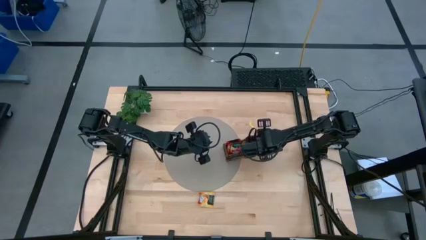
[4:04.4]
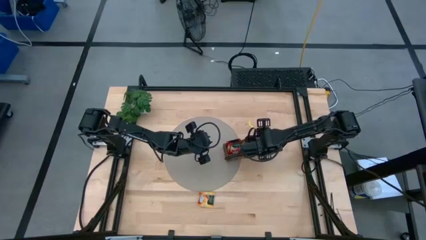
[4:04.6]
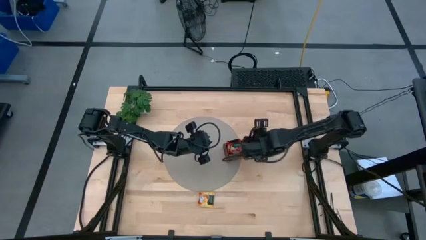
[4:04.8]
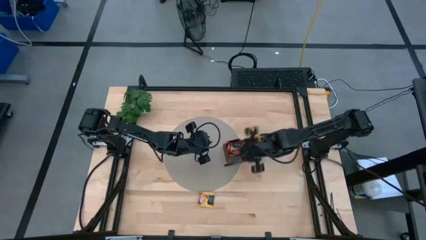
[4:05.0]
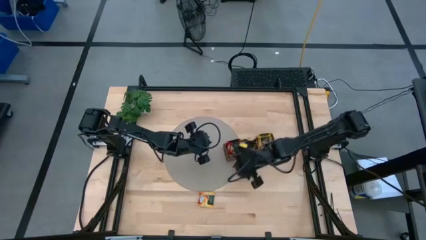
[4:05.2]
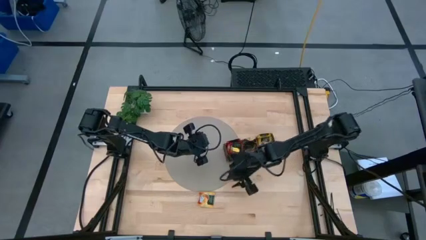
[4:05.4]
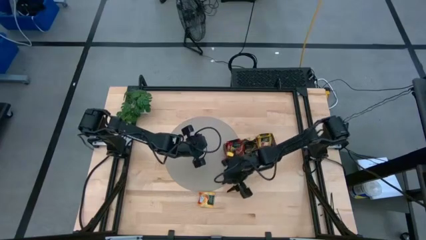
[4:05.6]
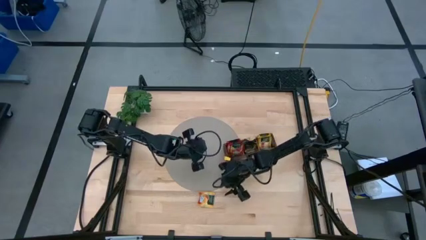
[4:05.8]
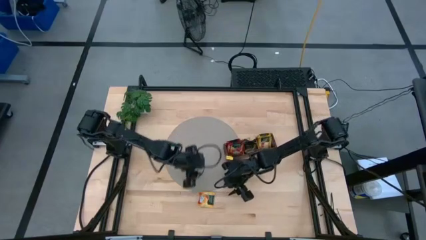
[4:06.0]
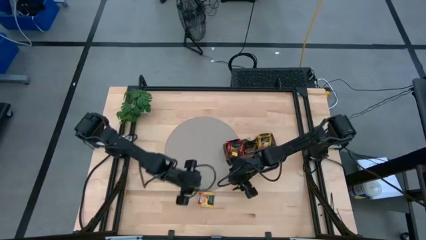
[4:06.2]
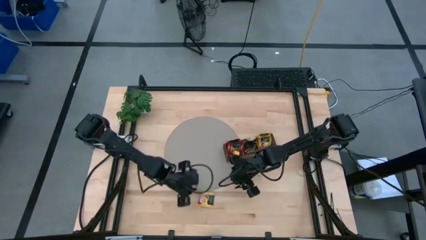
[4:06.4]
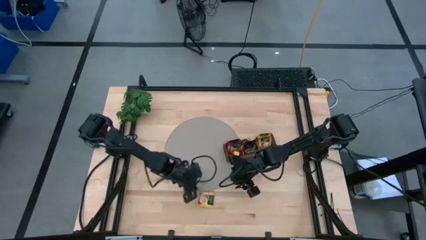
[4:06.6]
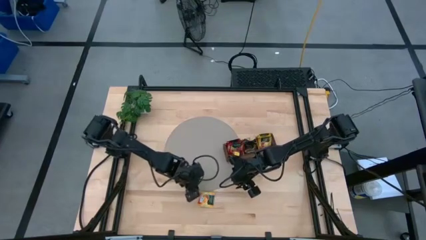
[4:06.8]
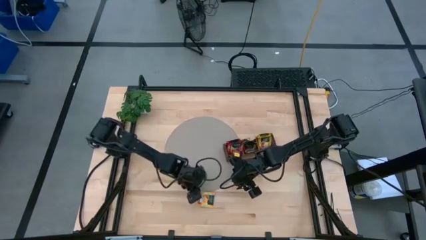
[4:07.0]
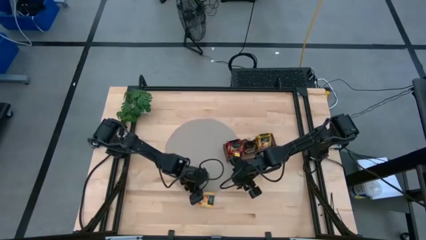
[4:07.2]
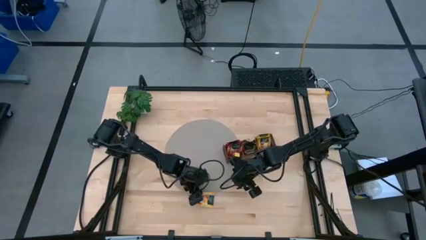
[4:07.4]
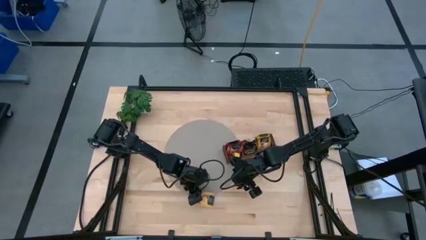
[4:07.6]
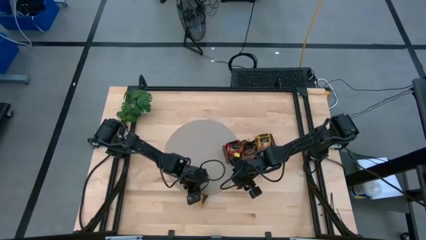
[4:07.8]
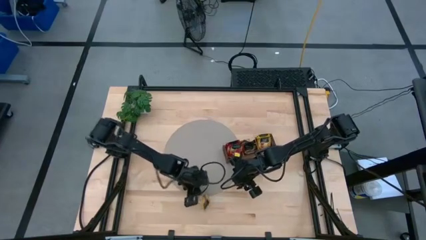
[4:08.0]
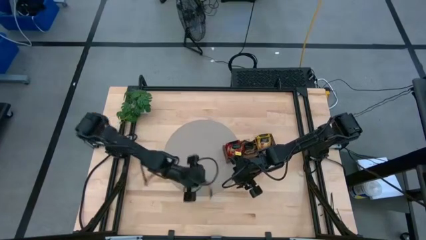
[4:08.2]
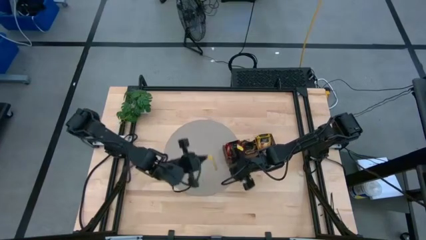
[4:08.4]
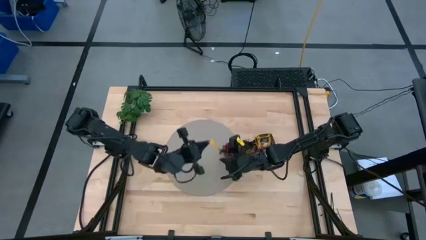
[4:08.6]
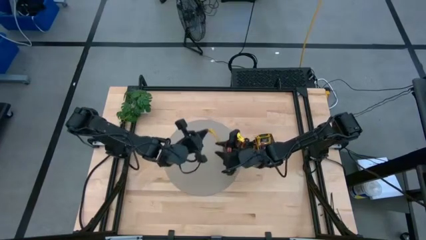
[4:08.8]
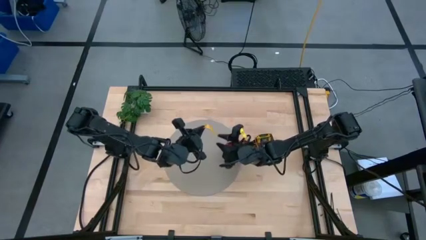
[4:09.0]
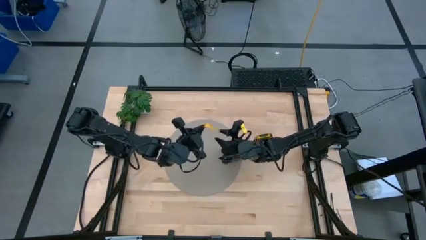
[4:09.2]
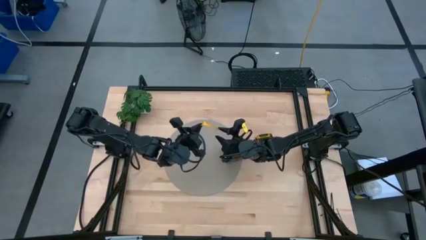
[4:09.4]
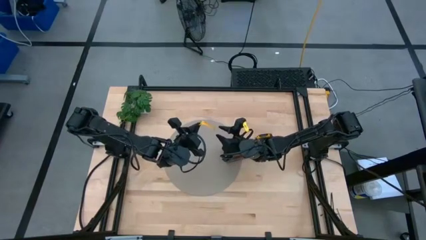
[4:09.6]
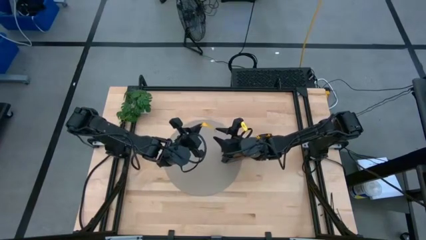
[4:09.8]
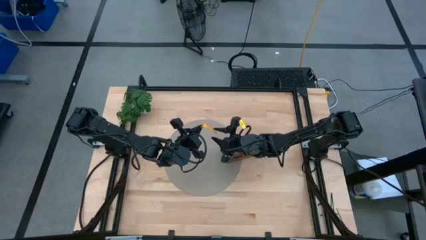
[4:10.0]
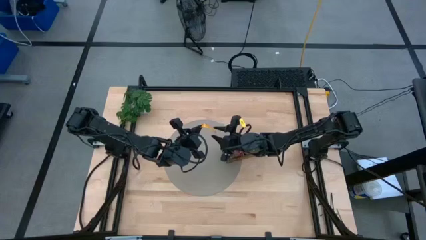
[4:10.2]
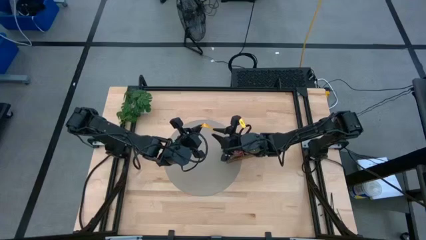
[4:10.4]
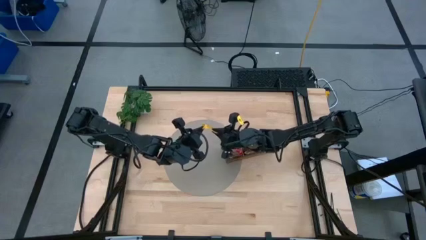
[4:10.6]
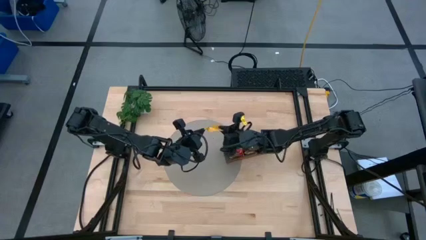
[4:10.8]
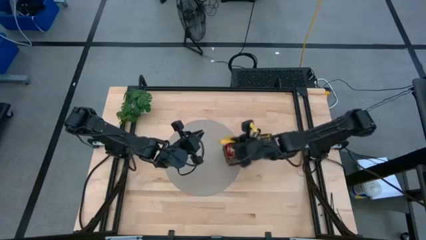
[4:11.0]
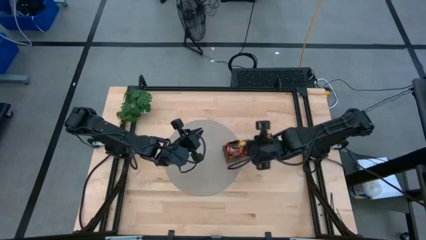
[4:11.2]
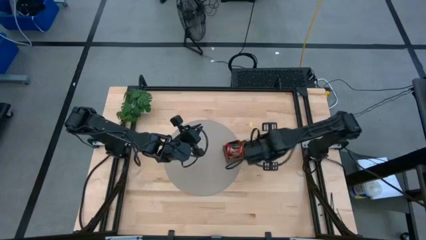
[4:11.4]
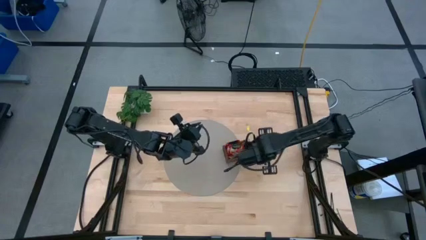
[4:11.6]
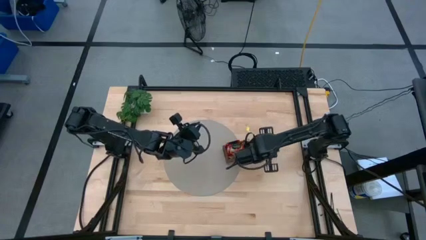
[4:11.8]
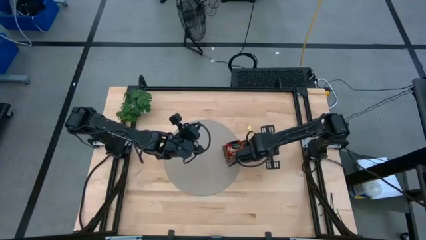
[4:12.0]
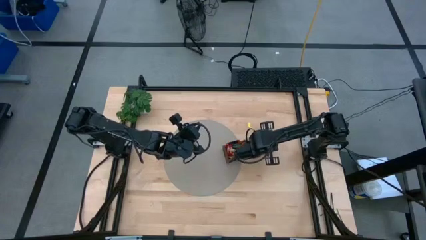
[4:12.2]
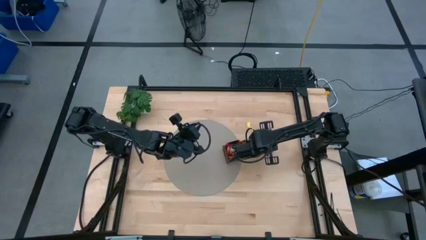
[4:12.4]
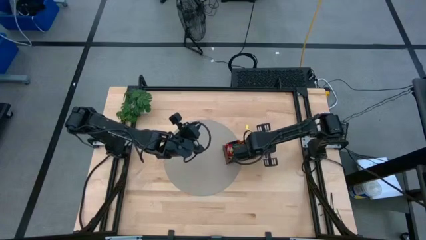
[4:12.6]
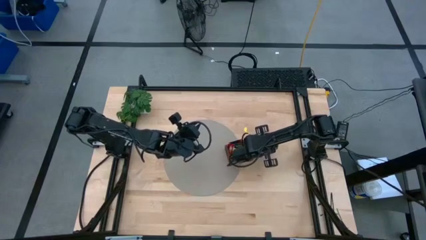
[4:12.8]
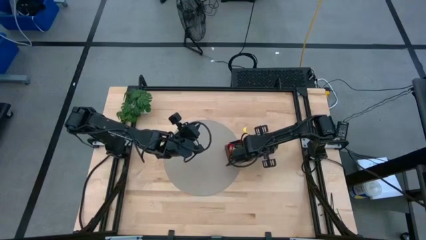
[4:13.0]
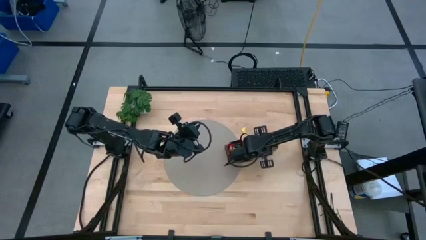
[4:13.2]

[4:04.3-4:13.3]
Task: Pick & Place Tea
Put the yellow tea bag into the right section of the wooden organizer

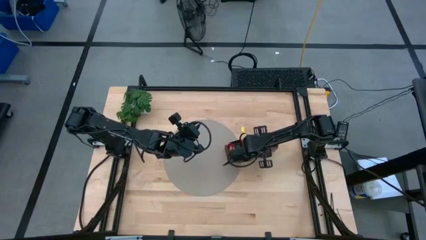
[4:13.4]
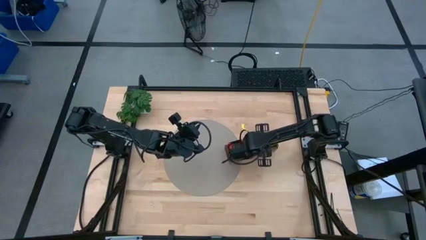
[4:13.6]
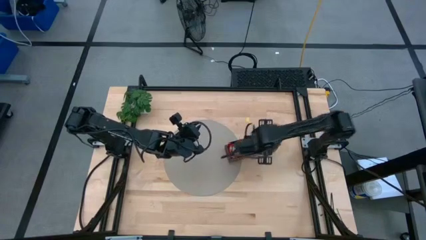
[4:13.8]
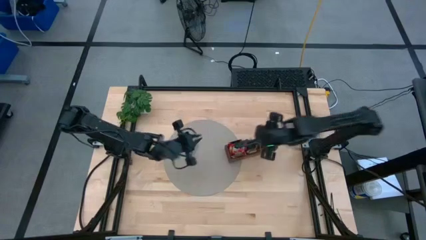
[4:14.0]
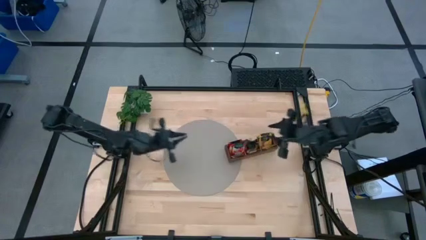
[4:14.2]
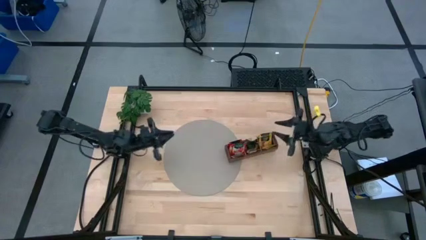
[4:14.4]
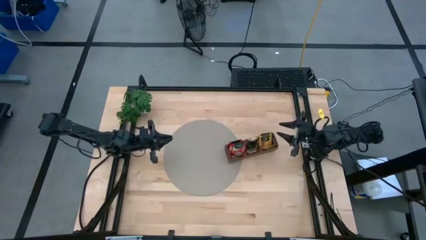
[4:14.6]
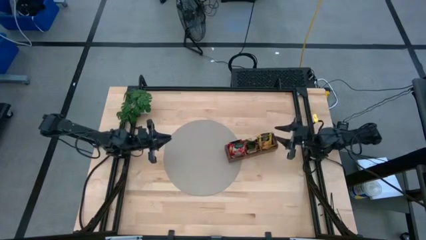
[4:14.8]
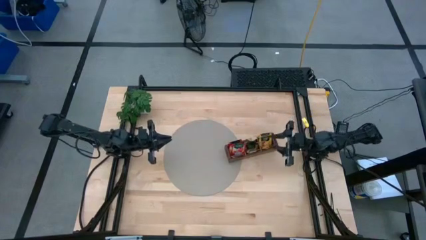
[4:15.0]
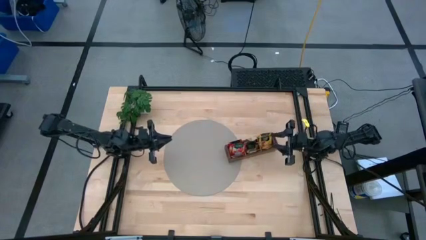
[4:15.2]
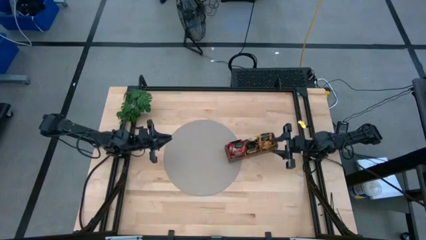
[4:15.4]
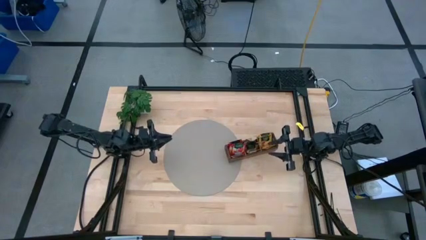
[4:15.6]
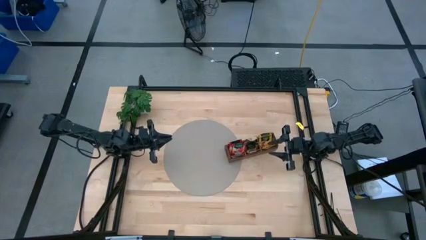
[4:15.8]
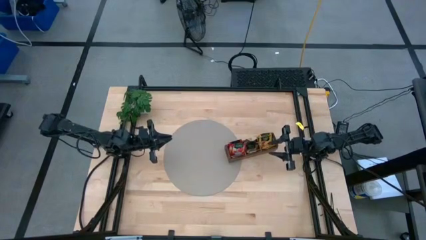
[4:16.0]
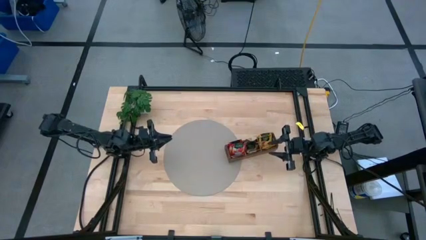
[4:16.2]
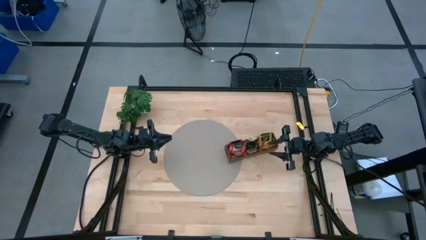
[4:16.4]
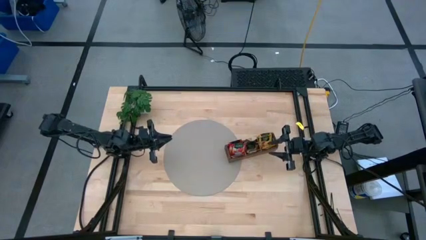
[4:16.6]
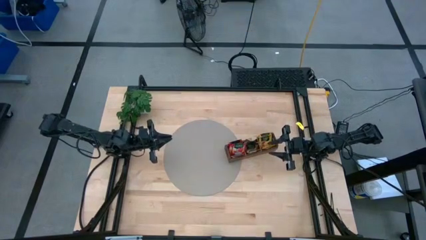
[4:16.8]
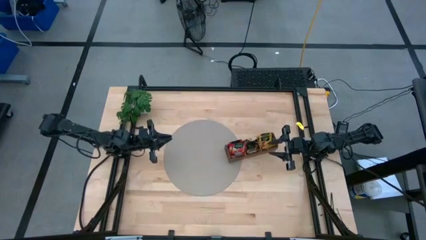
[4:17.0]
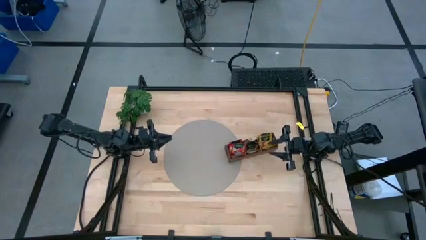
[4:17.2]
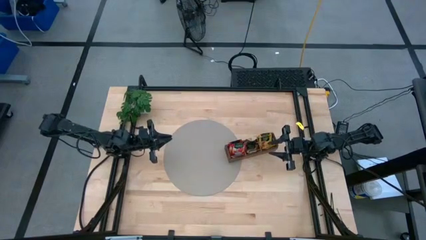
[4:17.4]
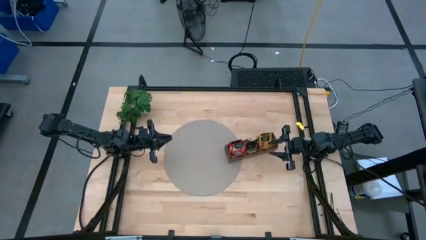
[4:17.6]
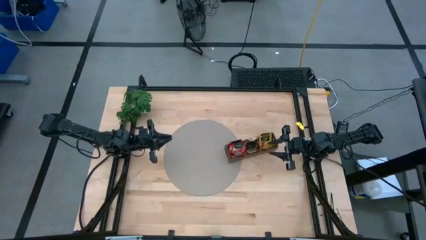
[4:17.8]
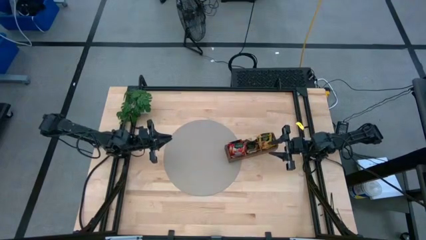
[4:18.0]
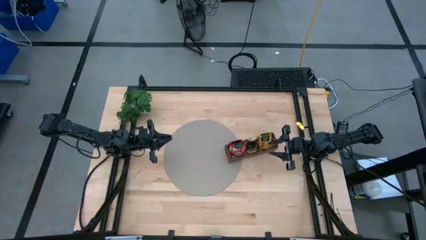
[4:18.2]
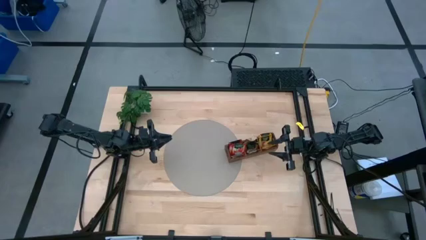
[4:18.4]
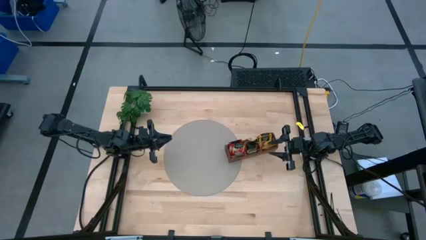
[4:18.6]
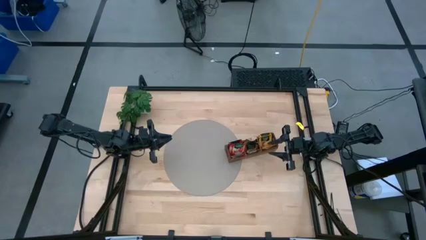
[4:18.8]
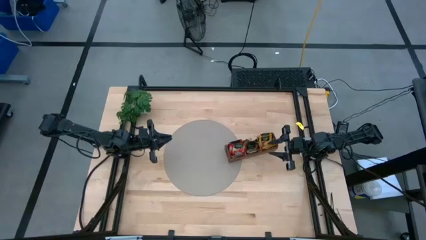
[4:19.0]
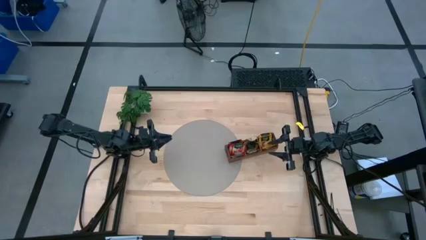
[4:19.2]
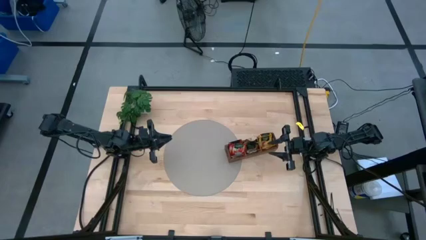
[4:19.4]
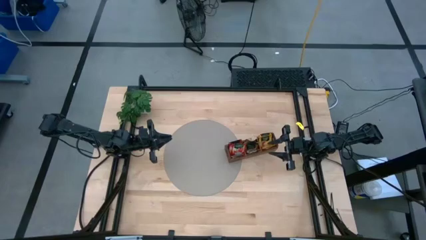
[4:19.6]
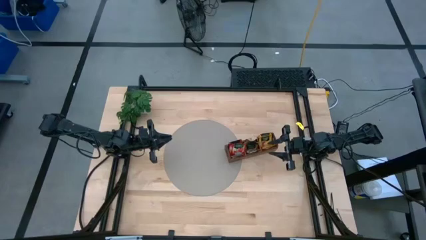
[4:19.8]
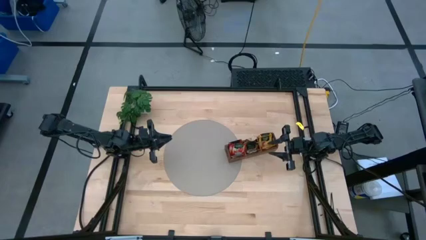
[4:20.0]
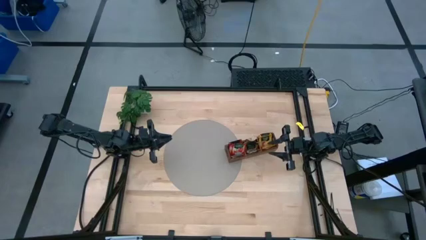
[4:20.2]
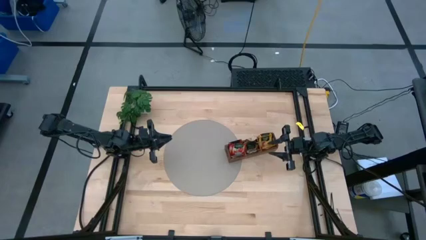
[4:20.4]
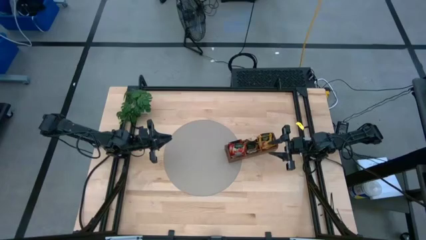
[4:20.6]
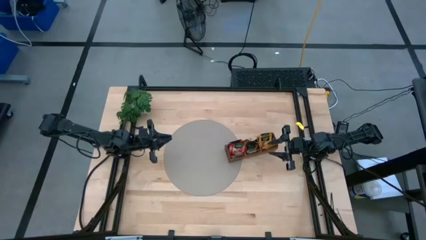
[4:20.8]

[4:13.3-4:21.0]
Return to Home Position
